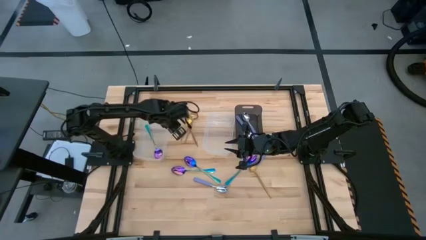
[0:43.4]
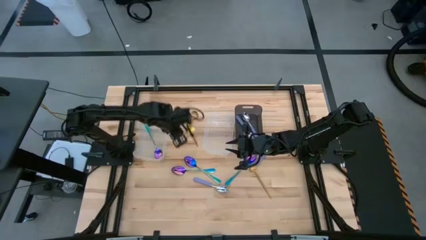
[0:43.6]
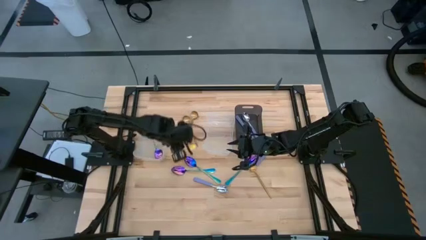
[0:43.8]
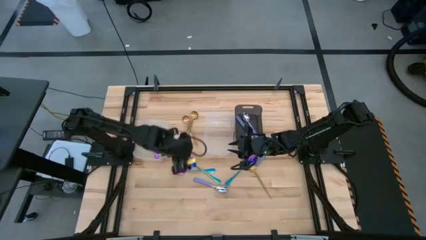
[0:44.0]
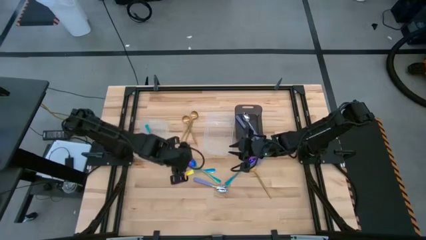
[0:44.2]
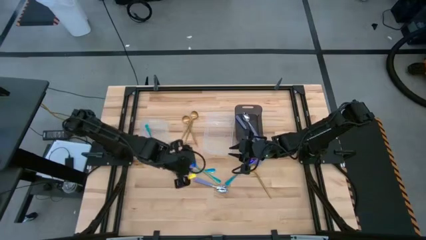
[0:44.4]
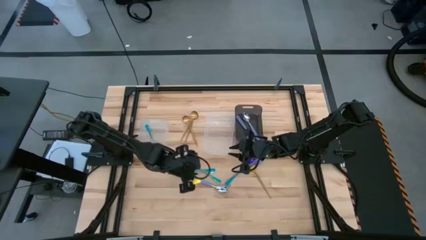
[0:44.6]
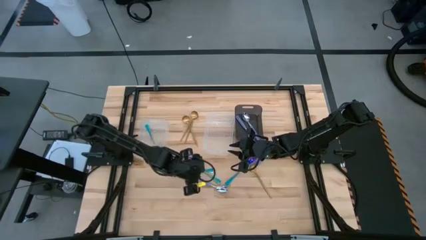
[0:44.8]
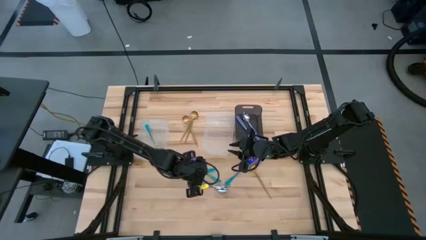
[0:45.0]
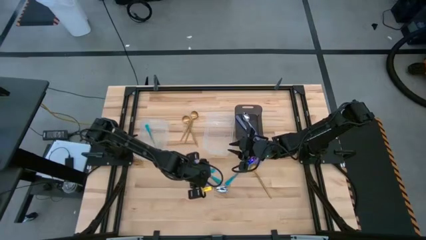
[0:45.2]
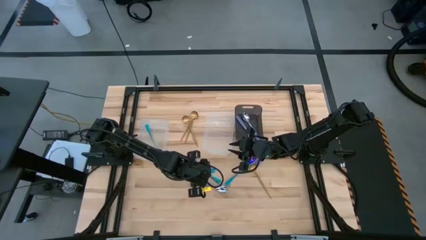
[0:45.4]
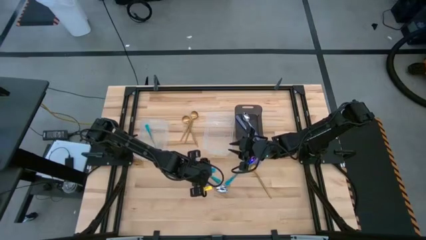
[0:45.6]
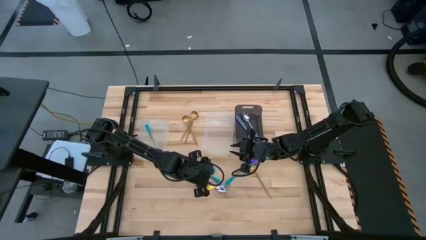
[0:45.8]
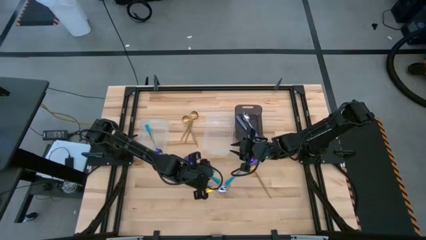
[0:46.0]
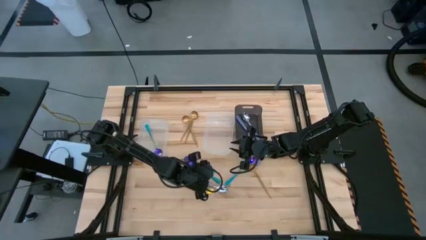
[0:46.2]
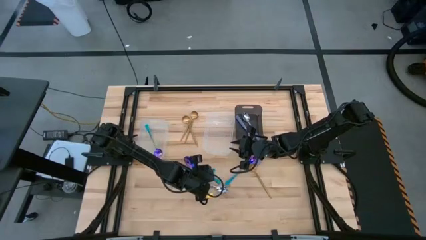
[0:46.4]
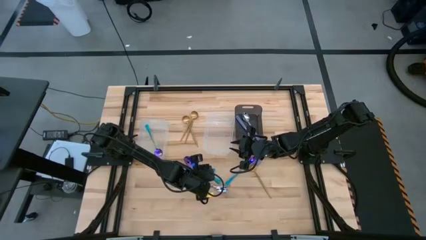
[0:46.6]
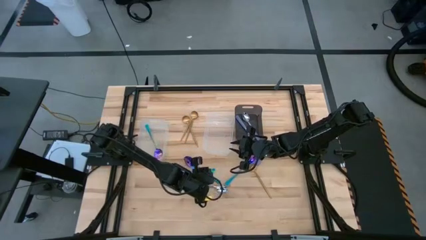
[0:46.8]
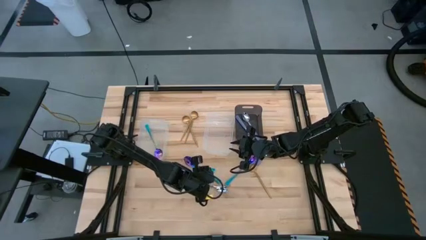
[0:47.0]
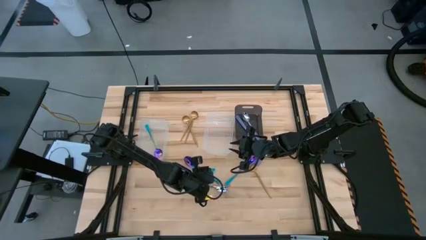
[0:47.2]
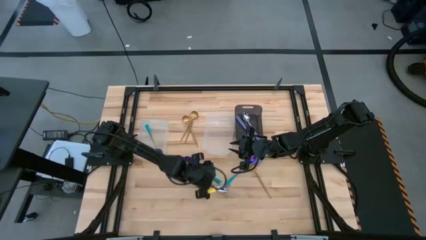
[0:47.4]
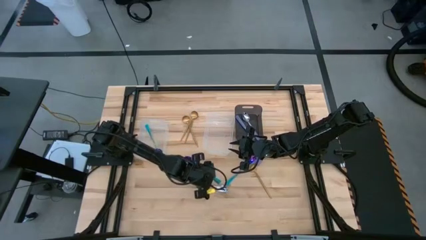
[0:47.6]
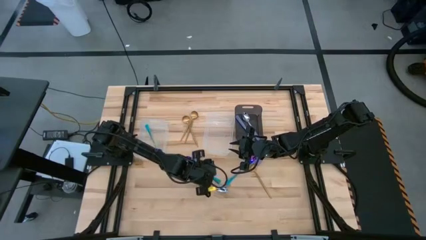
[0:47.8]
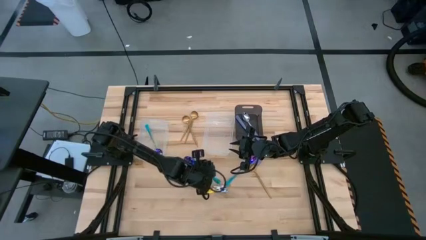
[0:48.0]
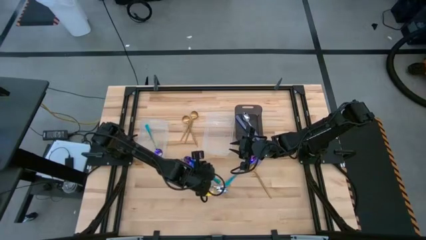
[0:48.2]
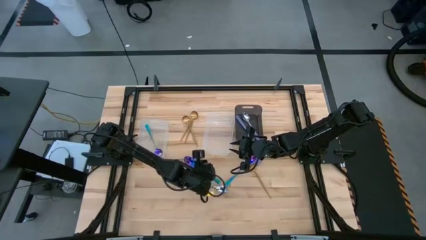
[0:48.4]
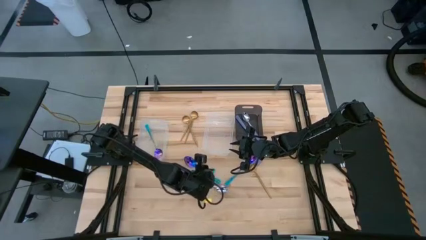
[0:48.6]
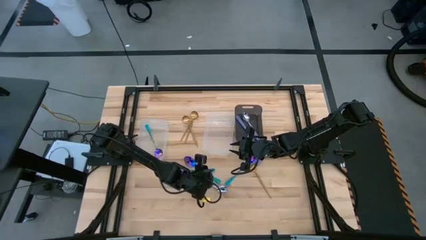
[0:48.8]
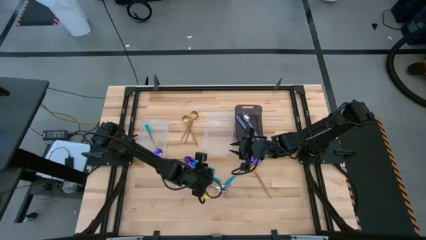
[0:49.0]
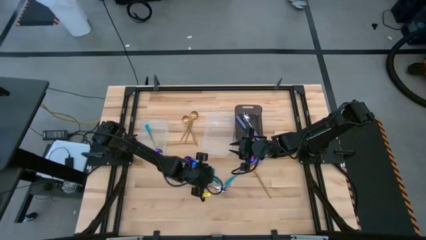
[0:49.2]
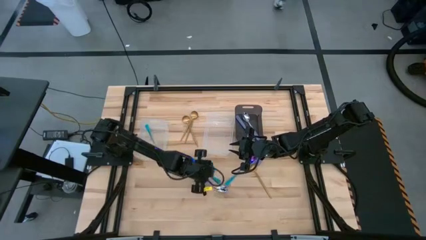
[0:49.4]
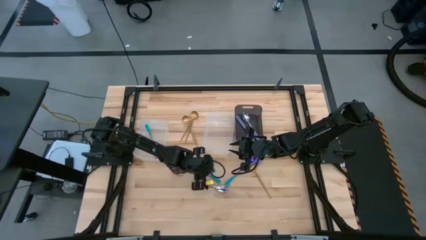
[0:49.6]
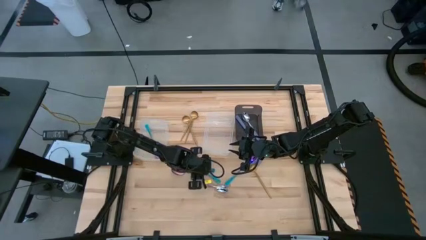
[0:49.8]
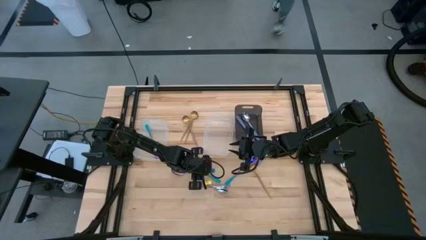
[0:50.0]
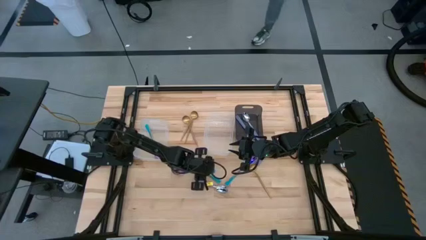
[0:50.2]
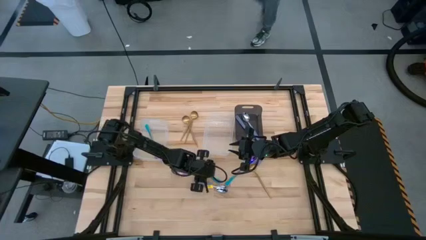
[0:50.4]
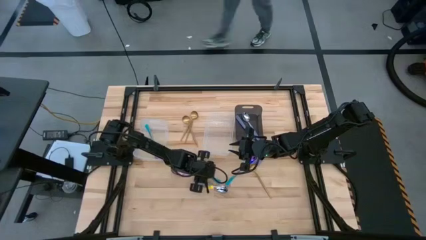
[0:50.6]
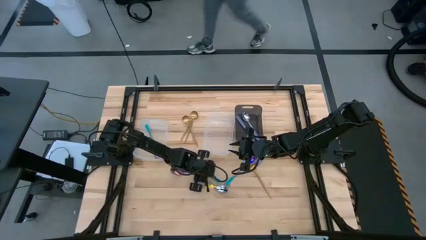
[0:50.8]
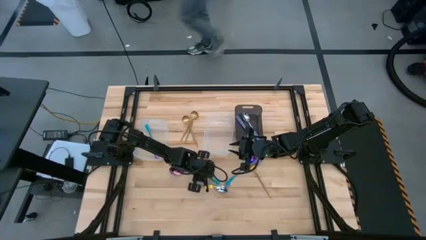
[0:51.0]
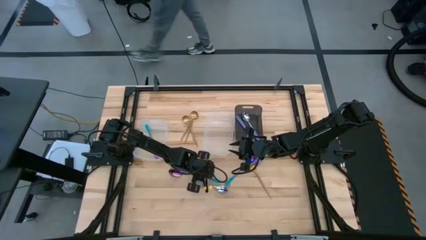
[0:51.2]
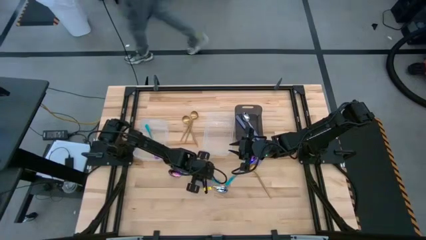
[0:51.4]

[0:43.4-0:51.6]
Task: Sort silverware by color (type)
Put the blue spoon into the left transparent bin

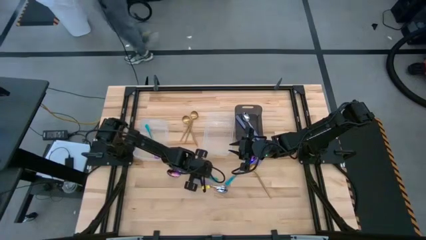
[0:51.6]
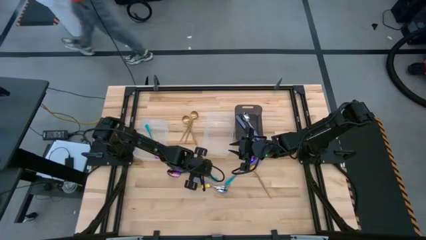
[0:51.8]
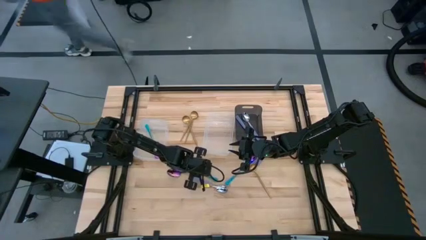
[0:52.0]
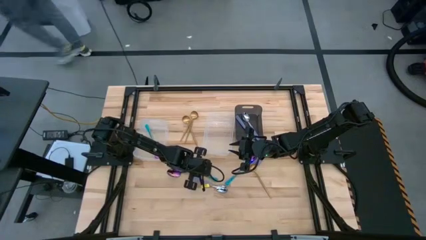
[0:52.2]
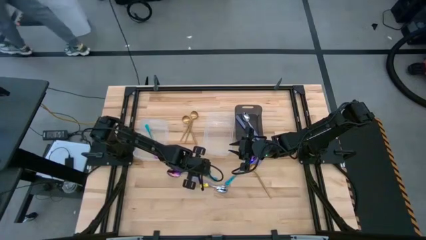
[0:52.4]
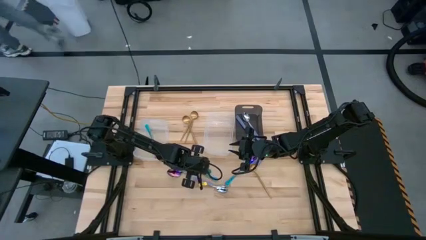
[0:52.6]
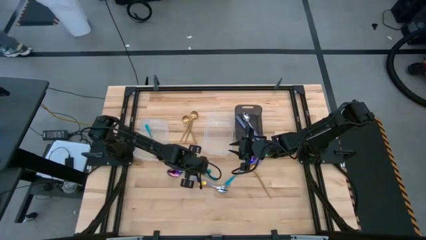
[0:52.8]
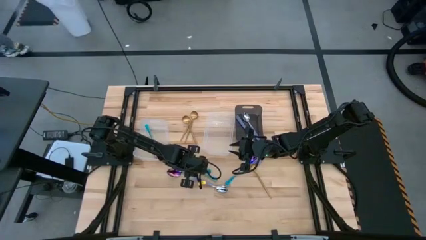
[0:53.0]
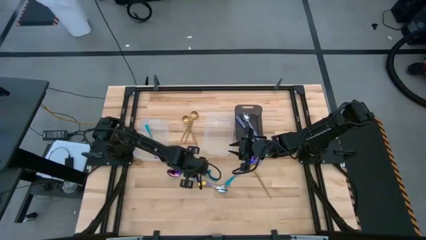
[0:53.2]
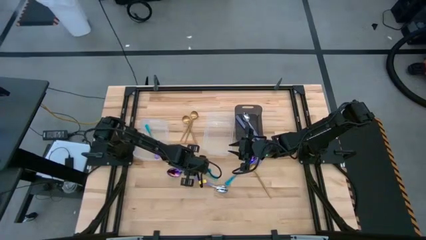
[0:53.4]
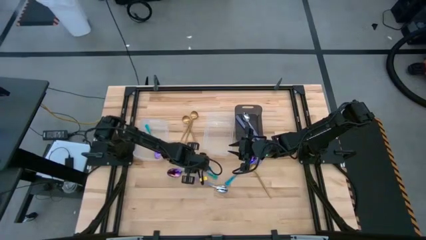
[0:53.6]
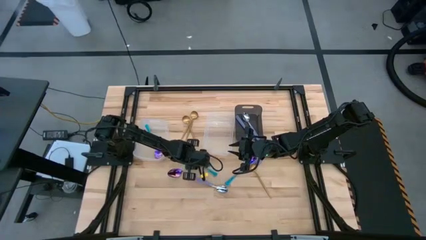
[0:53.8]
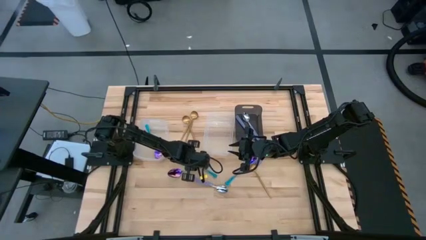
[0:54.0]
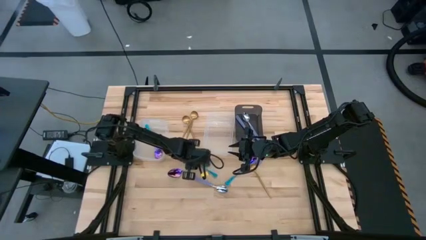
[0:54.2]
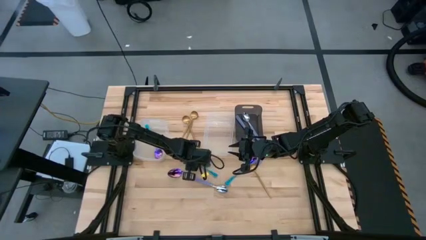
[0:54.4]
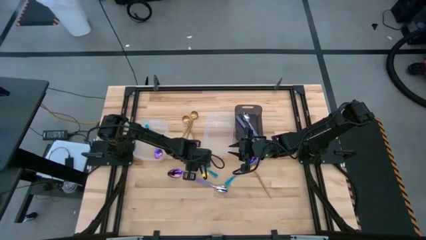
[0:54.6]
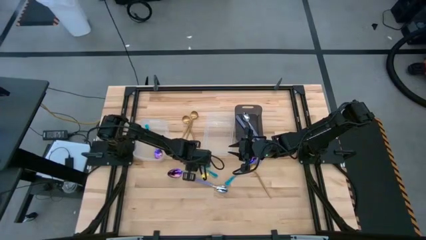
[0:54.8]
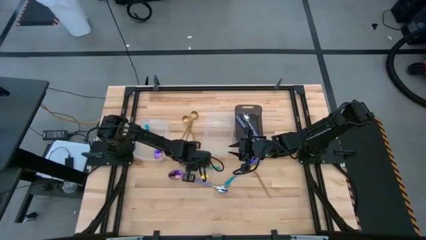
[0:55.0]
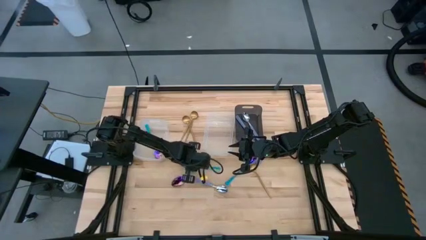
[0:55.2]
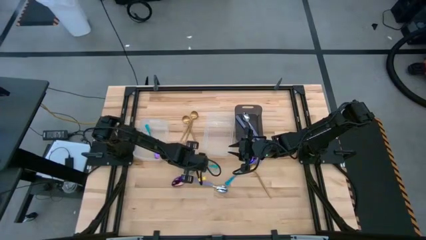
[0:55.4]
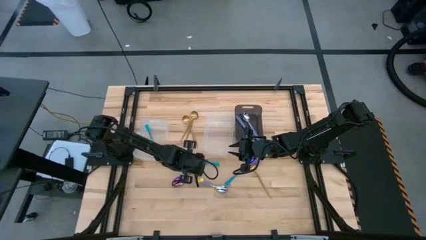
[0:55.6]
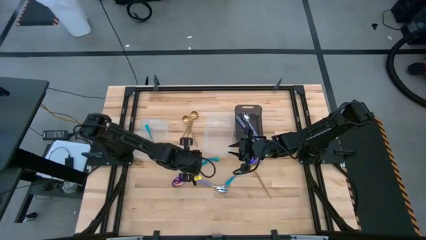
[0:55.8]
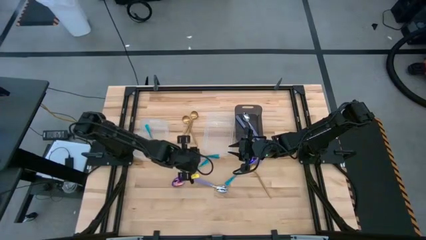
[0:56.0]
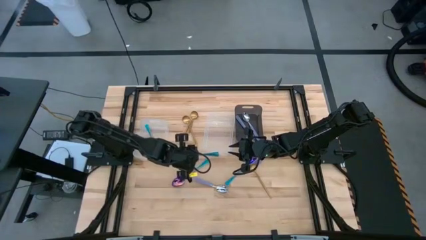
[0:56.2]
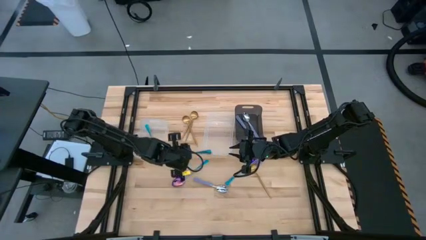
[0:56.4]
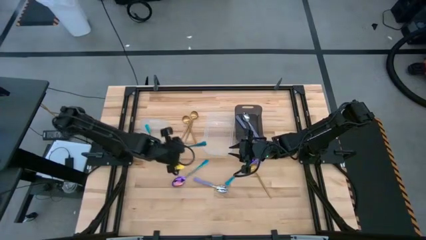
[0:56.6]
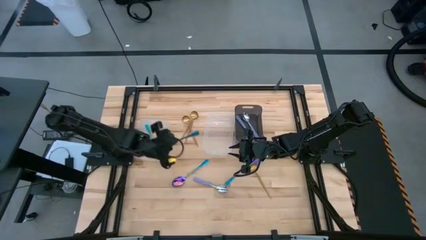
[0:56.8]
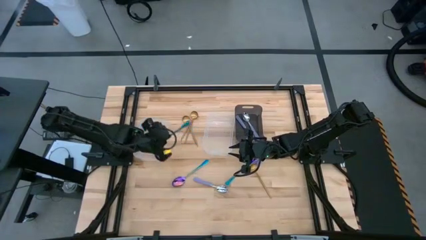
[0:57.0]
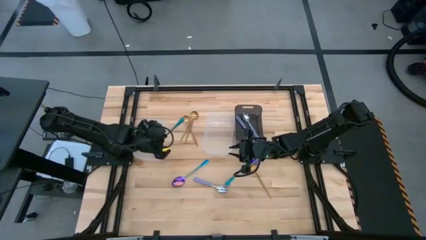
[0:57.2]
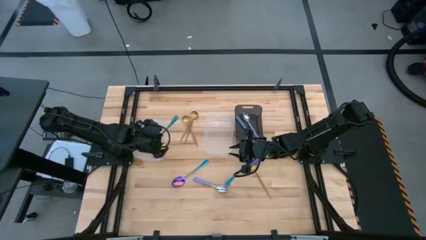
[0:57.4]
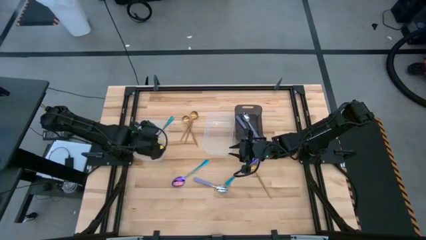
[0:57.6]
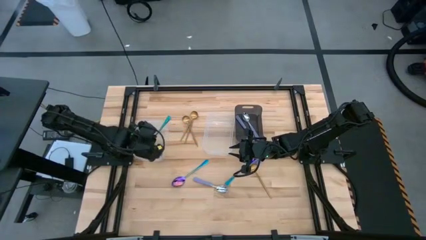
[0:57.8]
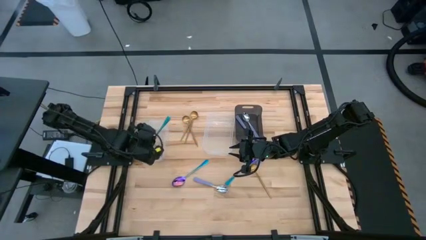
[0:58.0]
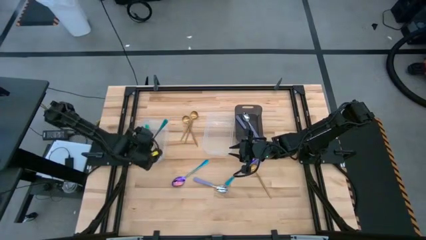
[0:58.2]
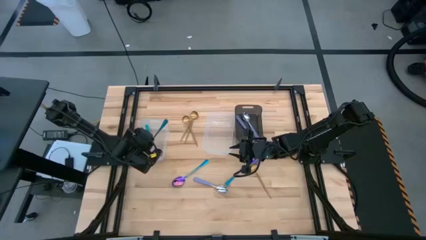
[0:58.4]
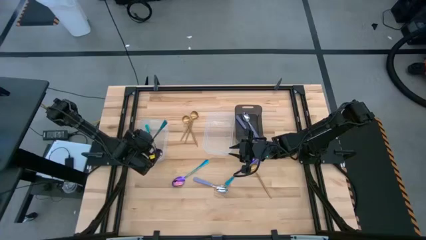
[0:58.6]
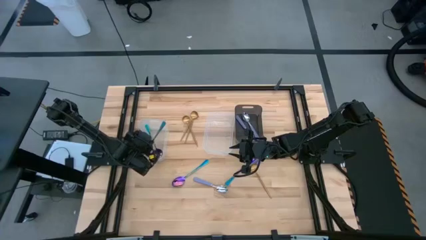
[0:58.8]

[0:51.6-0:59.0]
Put the blue spoon into the left transparent bin
